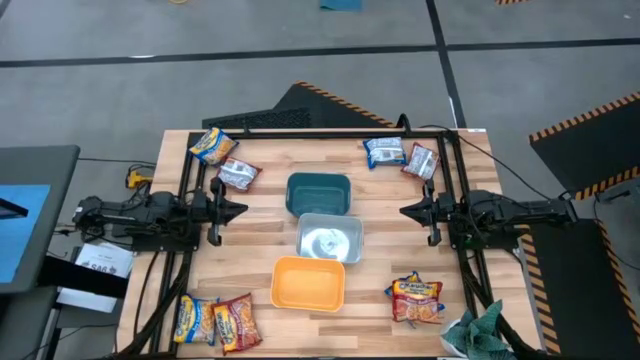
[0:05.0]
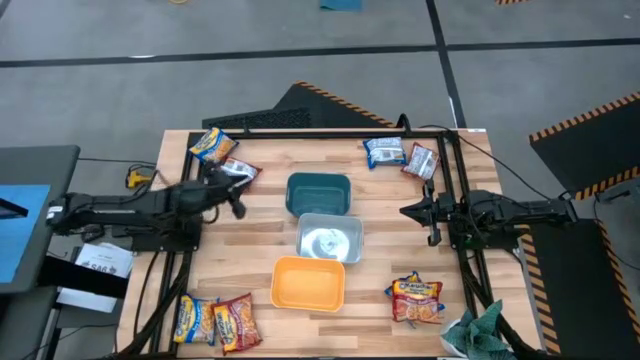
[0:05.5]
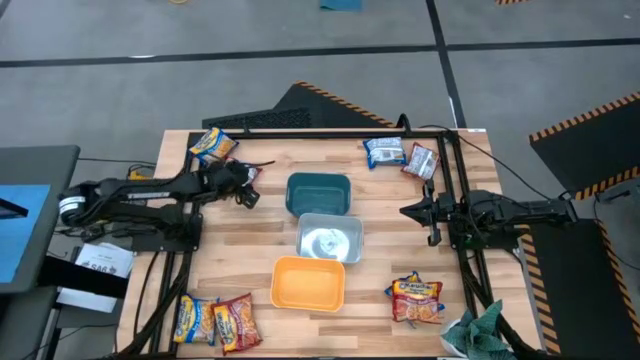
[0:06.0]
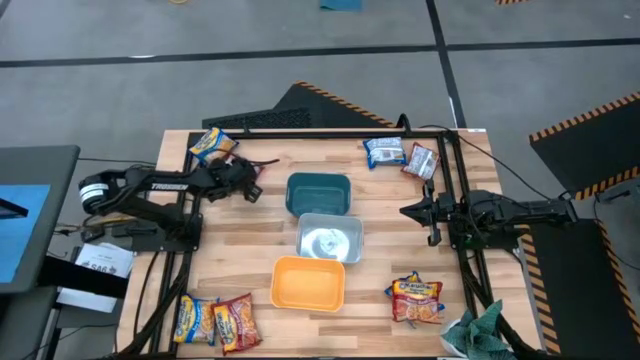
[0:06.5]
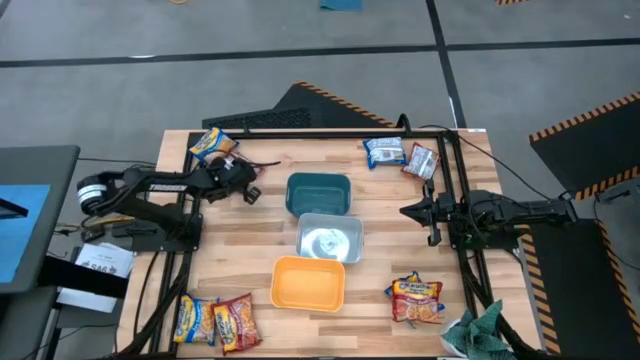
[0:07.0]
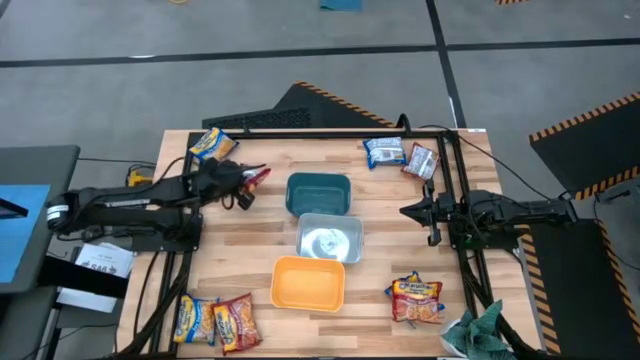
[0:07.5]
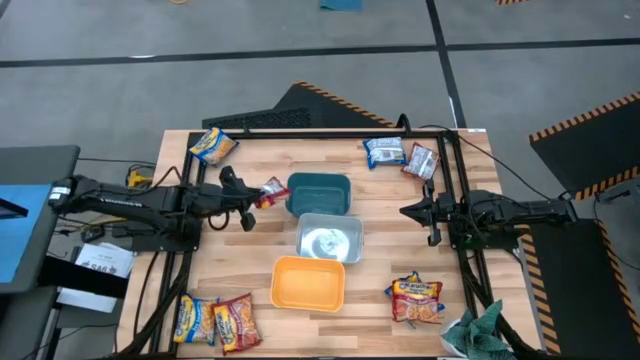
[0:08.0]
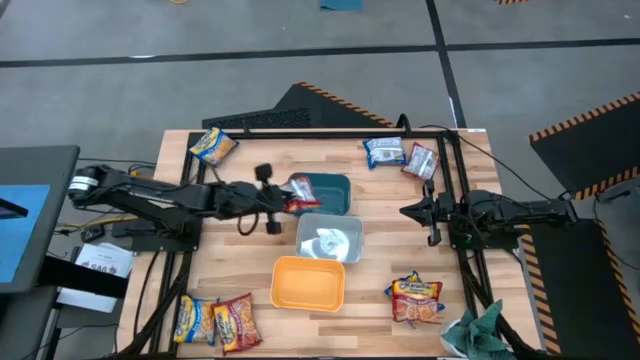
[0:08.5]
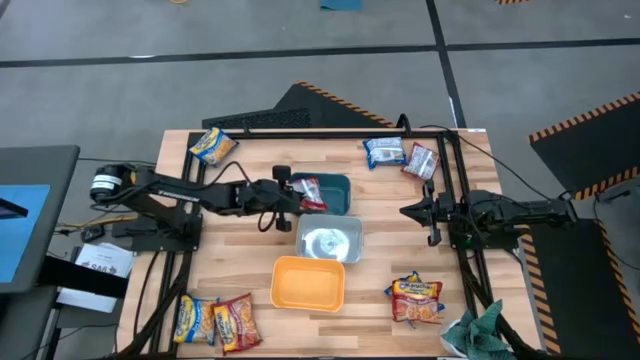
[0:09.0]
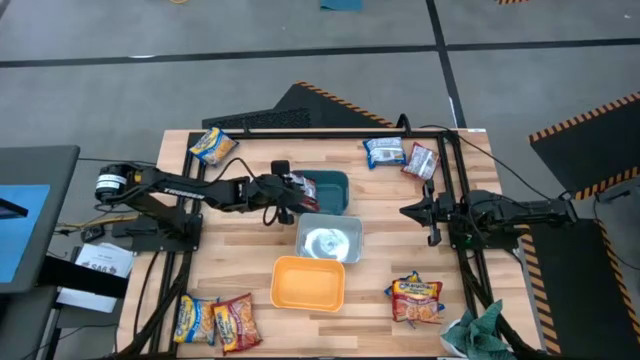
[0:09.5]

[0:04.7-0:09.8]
Task: Sort Maruchan noodles
Put the top left red noodle pack into the blue bin

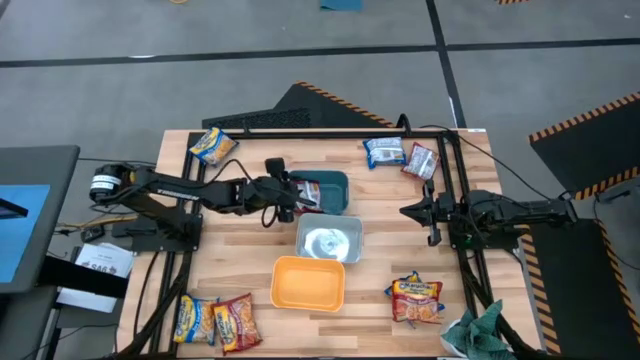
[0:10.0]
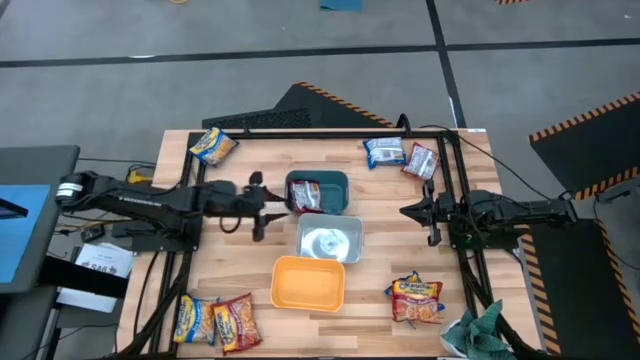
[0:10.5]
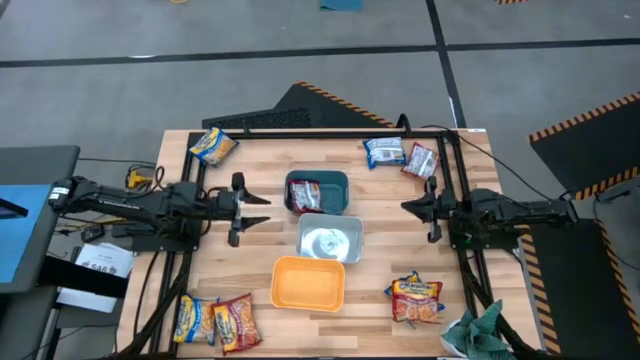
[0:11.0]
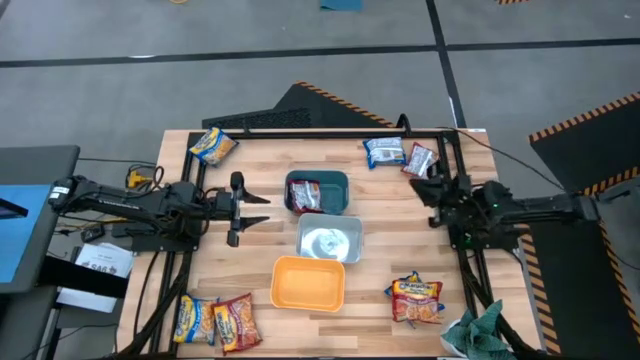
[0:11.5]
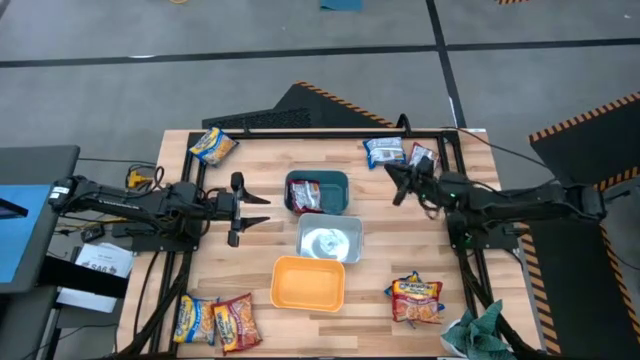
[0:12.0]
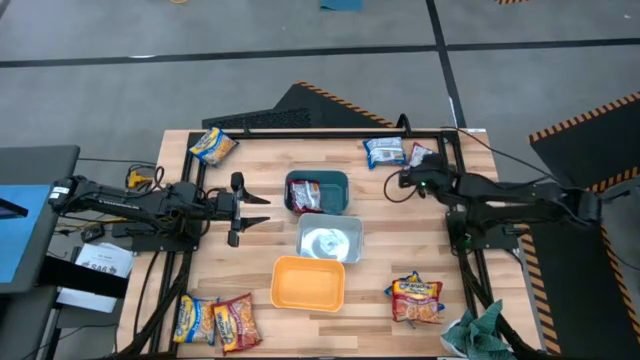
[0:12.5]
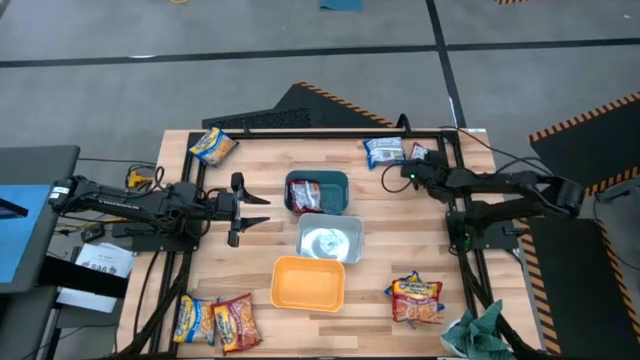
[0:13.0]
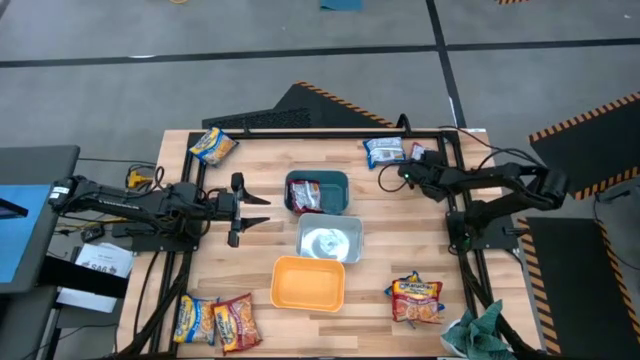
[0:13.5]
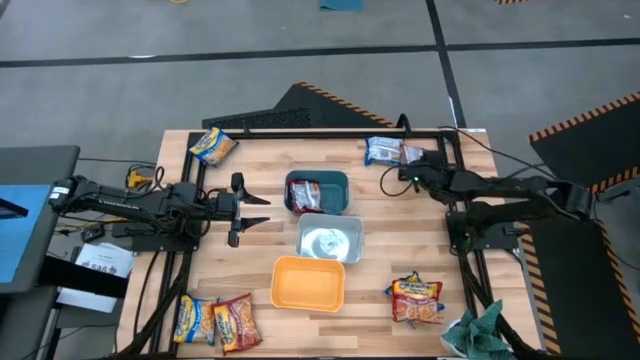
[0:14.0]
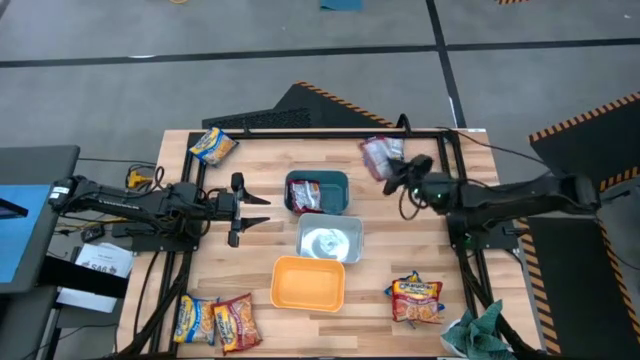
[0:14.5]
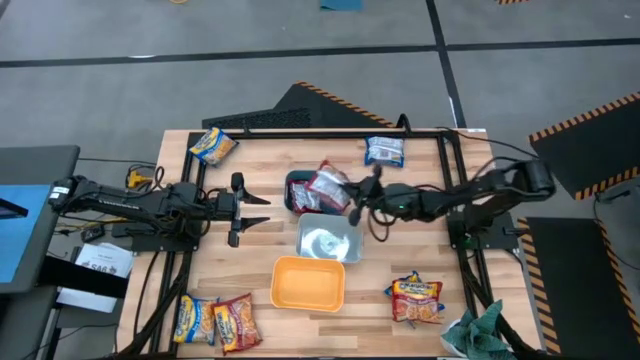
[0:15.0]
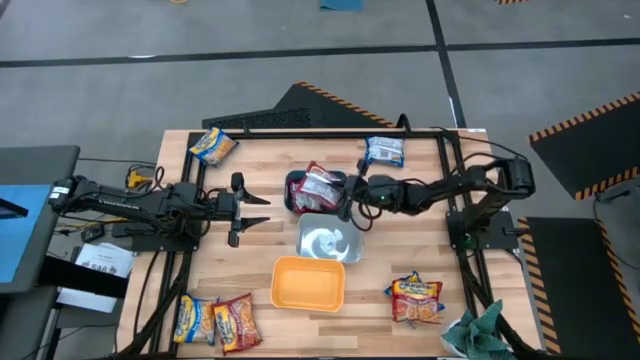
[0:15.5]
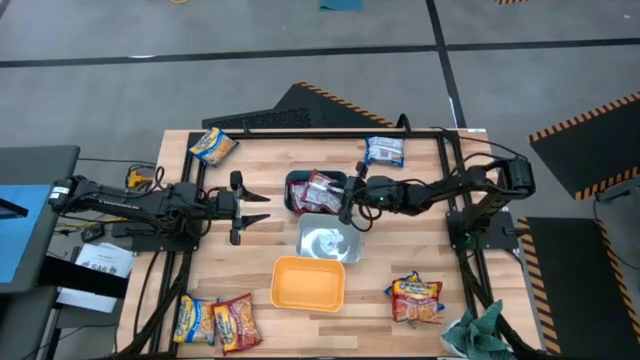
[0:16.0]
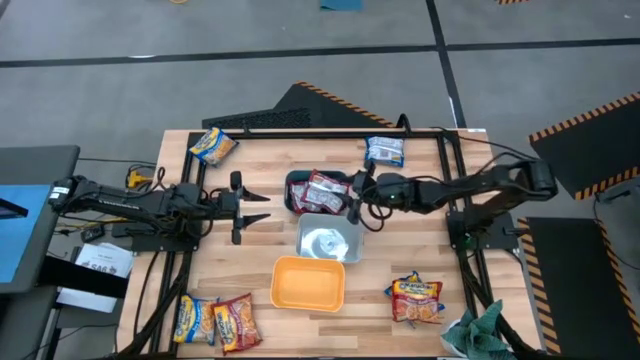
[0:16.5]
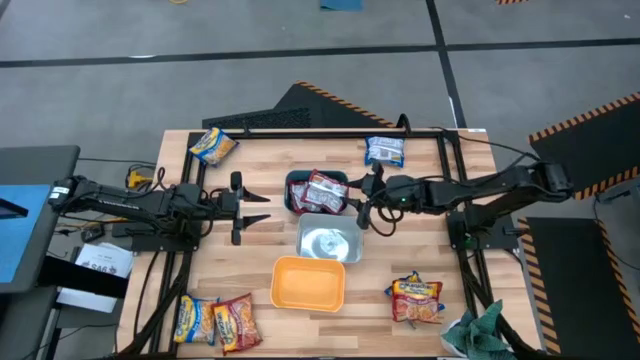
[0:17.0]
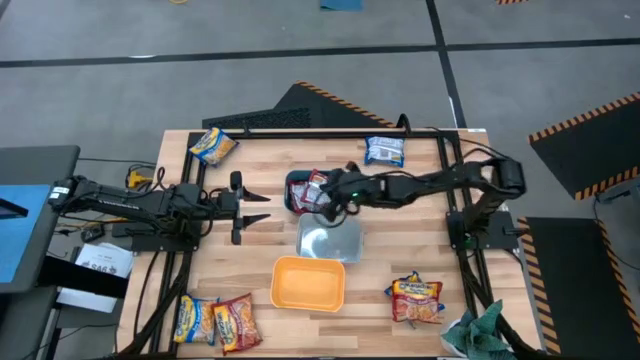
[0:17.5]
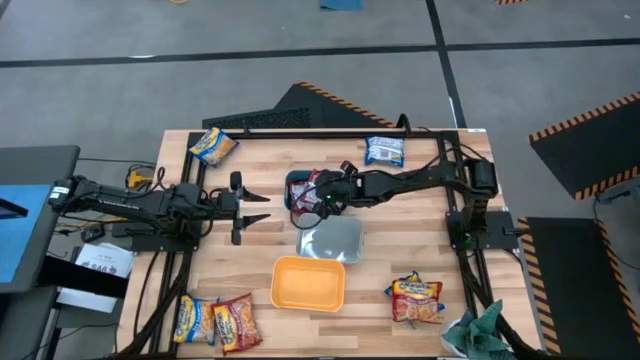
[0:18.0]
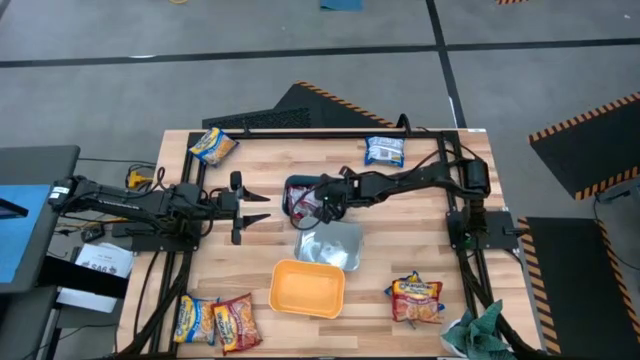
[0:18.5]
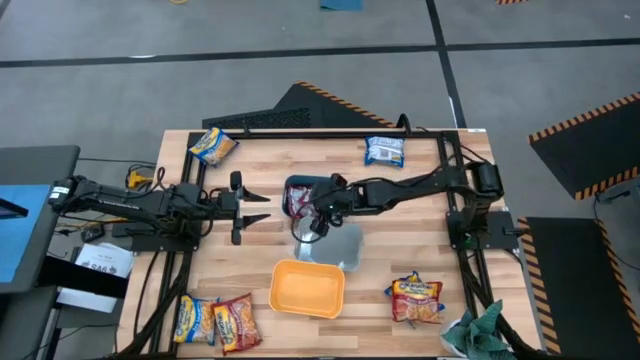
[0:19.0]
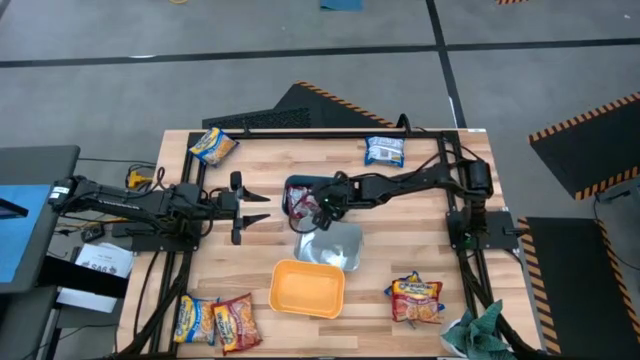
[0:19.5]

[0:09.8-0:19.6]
Put the top red noodle pack into the blue bin

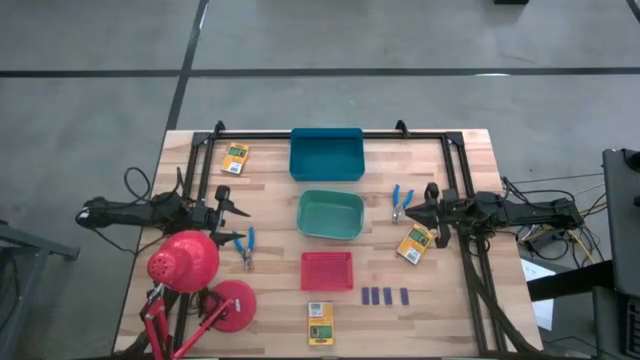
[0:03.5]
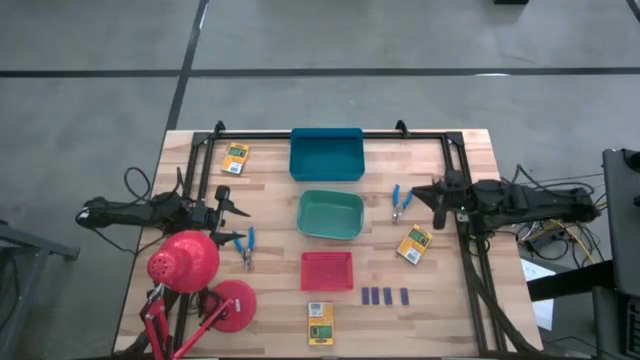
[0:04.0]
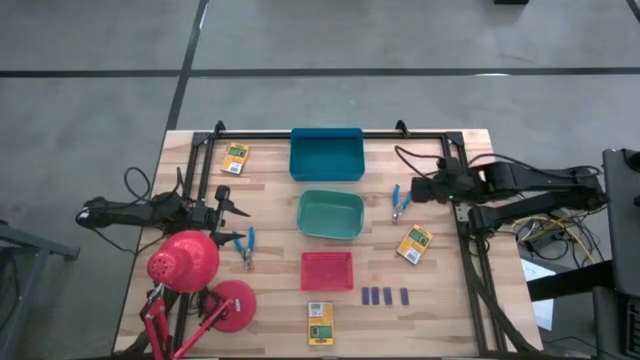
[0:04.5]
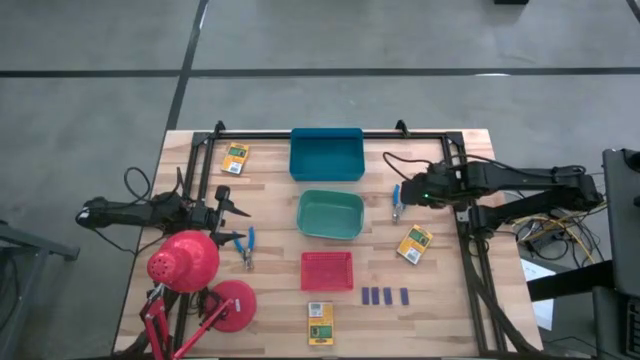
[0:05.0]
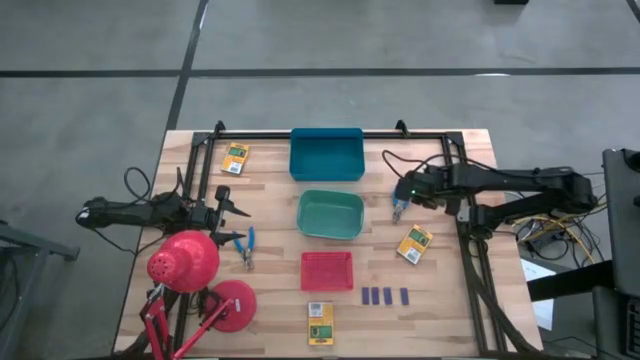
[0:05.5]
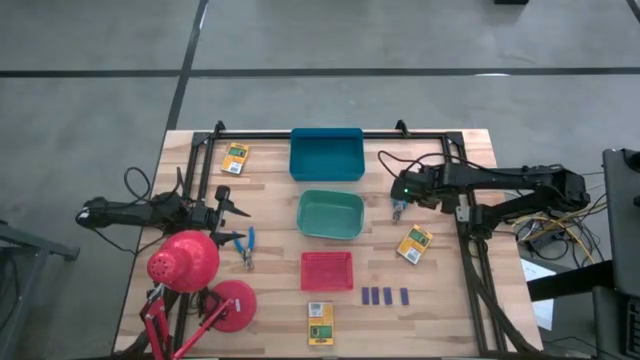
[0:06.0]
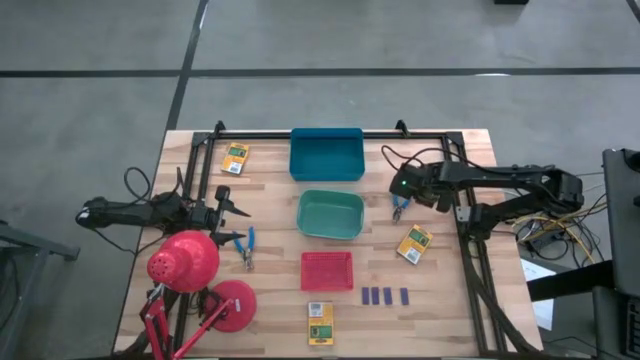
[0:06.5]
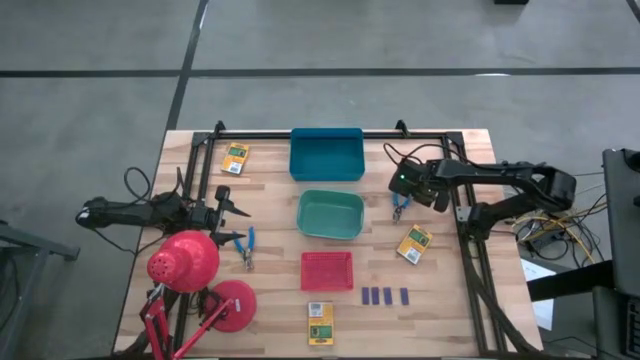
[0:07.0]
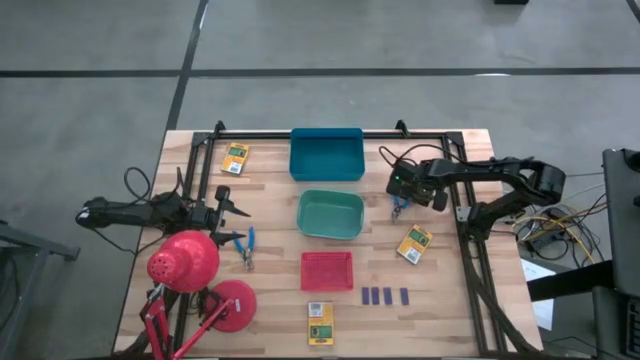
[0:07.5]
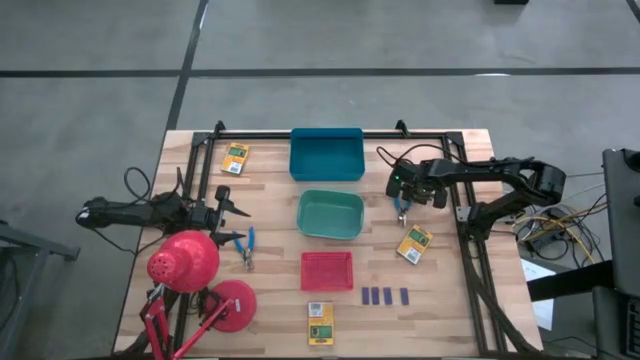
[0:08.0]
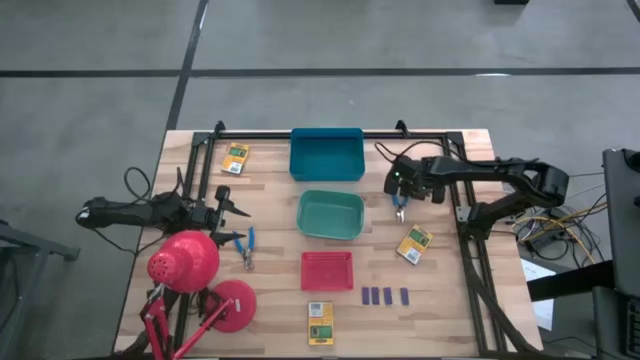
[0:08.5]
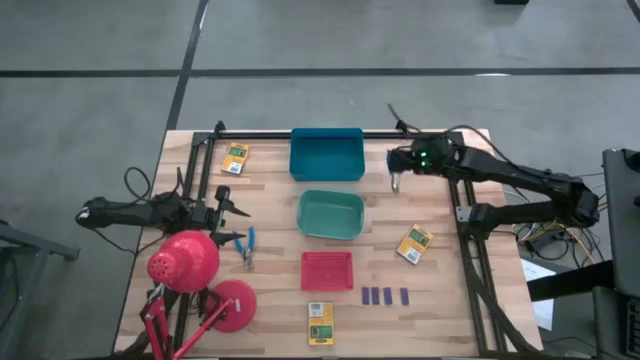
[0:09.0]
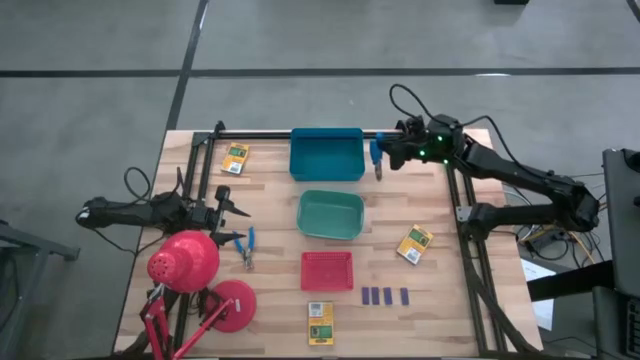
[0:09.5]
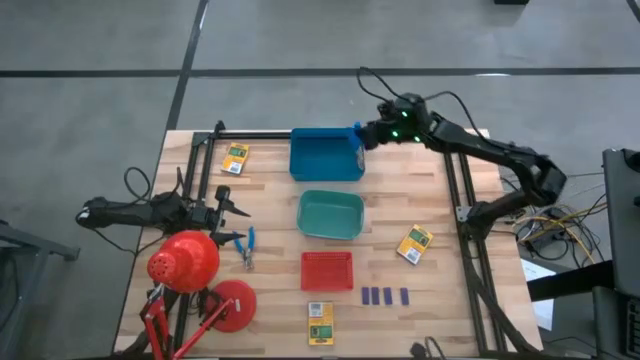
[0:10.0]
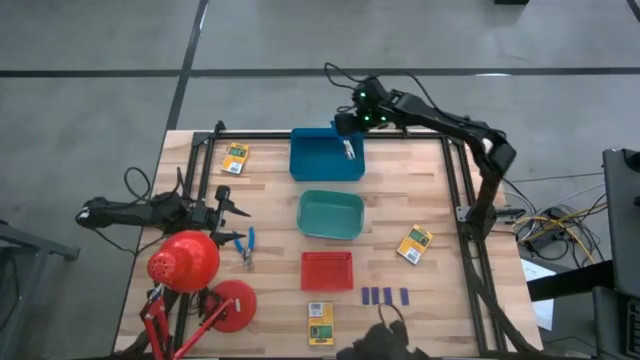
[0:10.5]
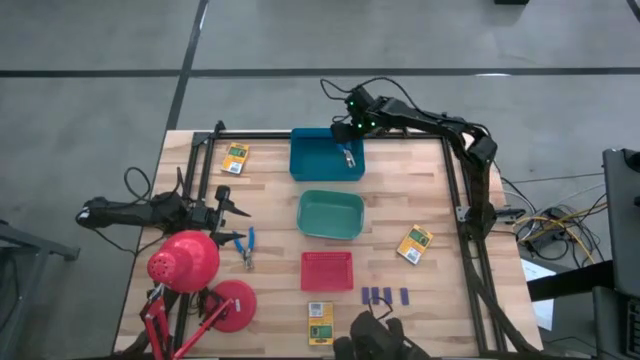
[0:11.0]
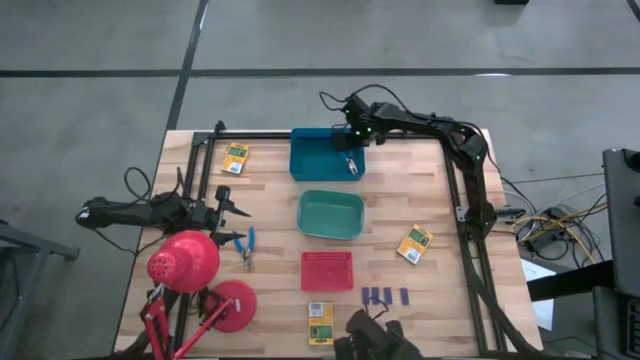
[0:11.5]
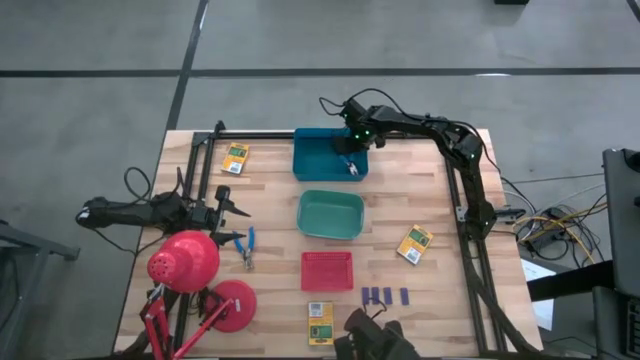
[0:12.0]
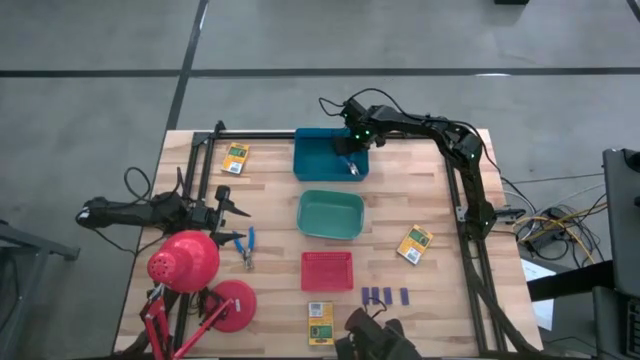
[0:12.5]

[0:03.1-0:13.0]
Task: Pick & Place School Supplies
Put the blue hole puncher into the blue bin
